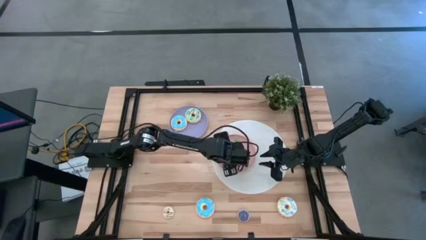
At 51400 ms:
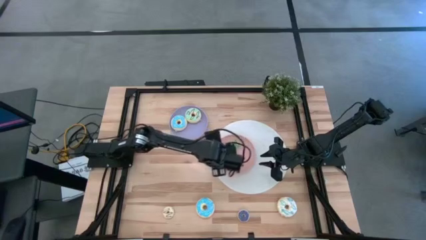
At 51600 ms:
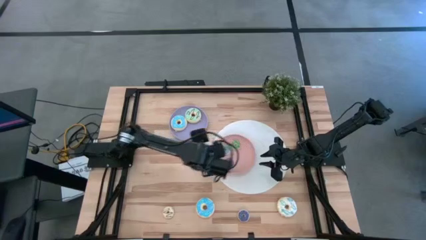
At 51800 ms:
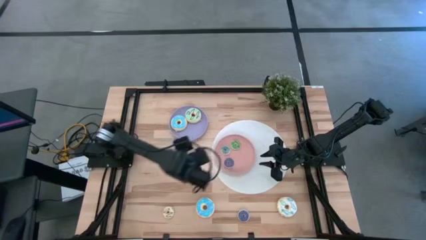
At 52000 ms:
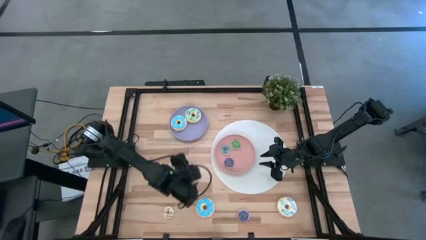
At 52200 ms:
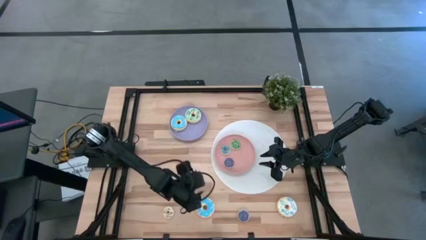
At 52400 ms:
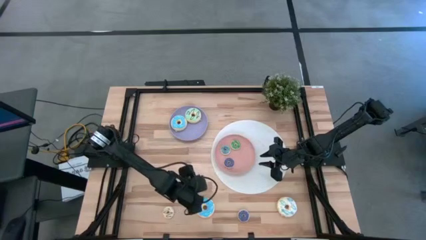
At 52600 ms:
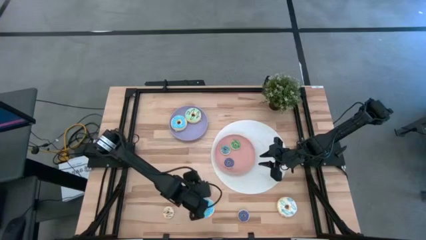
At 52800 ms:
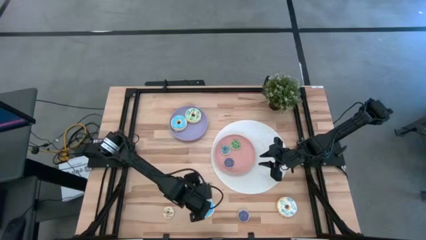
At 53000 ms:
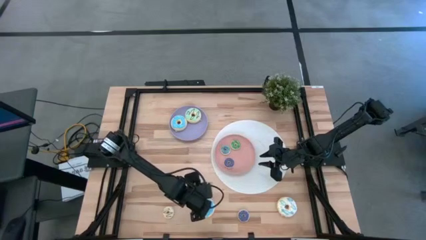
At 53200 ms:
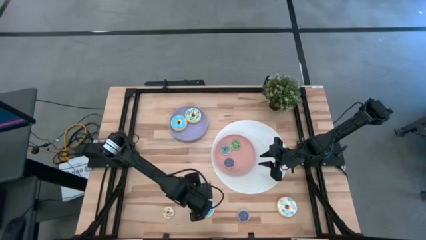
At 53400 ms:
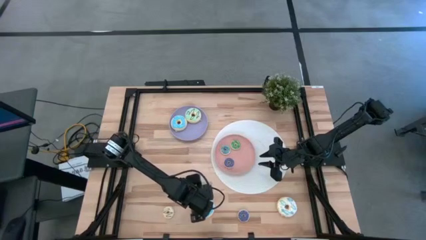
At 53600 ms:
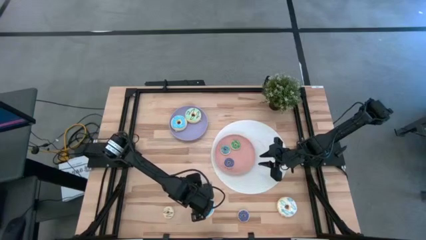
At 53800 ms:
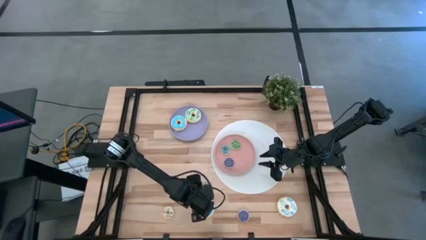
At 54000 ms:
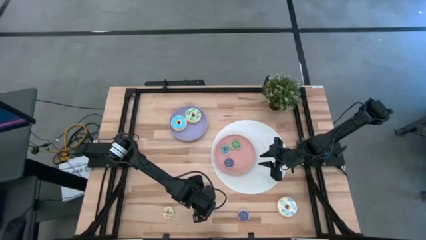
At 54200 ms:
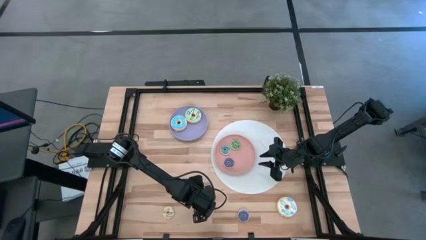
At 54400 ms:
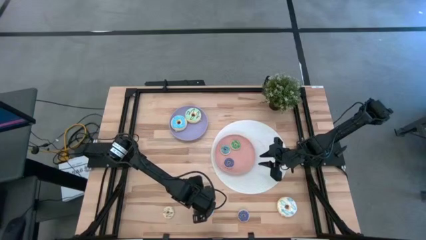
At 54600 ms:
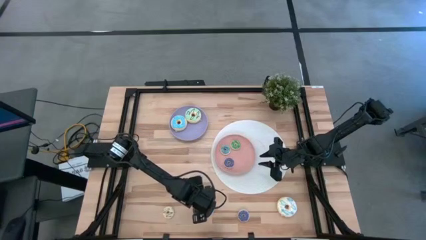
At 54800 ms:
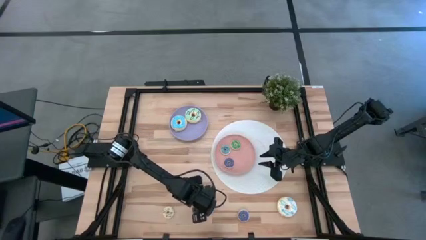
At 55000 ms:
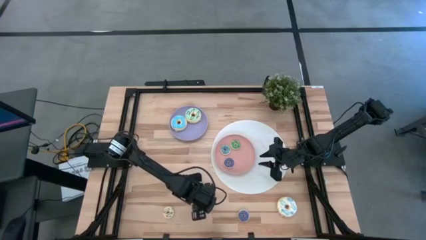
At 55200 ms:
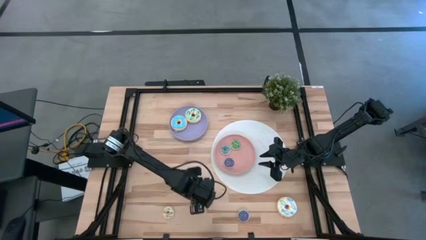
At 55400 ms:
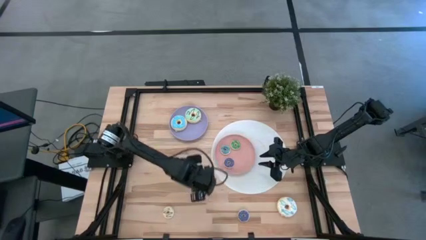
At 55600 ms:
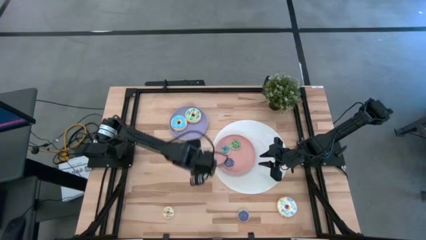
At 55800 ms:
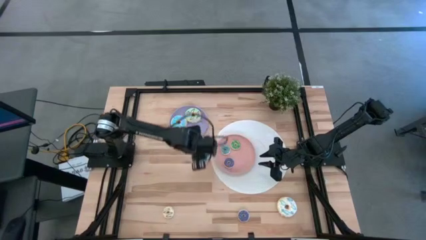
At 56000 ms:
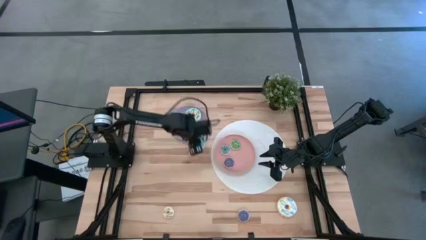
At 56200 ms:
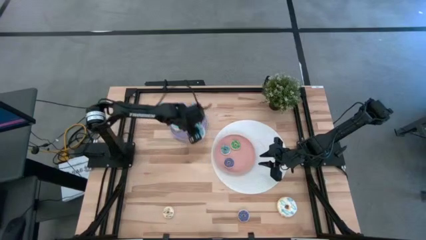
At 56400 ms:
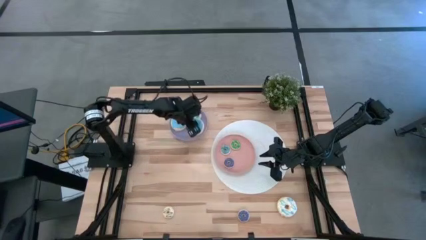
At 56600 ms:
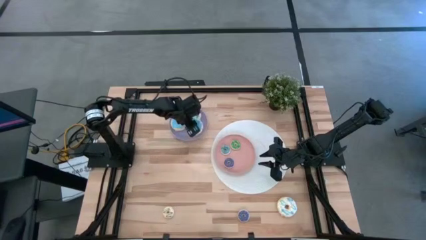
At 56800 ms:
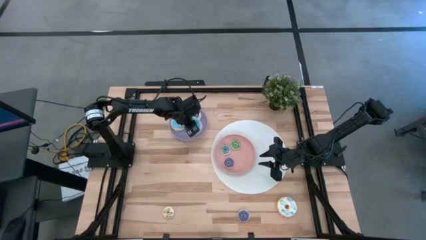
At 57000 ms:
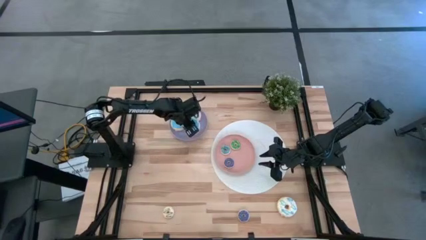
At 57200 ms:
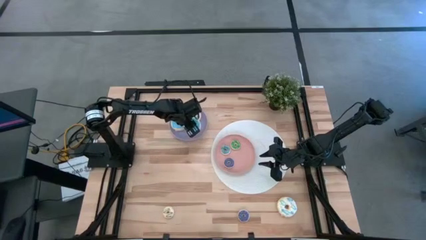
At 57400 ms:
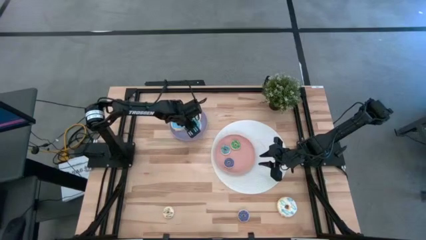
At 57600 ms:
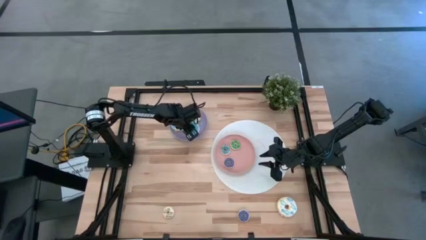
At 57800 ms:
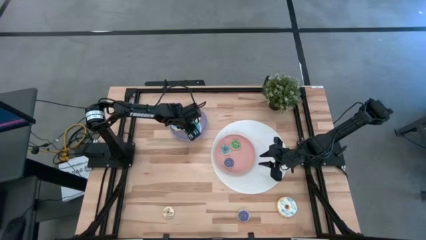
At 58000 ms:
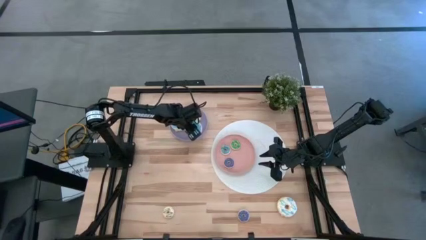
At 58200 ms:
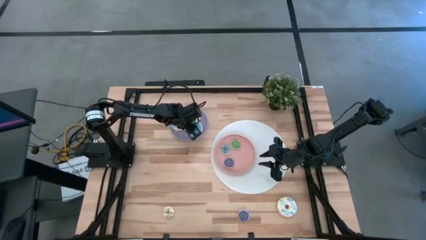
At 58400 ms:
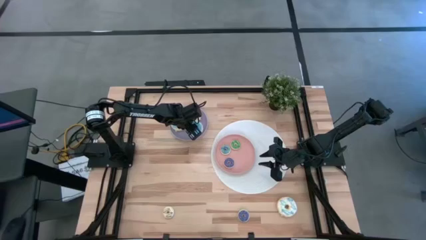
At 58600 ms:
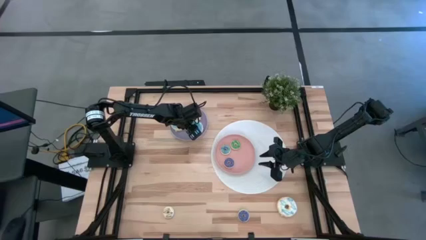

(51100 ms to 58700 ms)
Task: Pick & Place donuts
Put the big light blue donut on the violet plate

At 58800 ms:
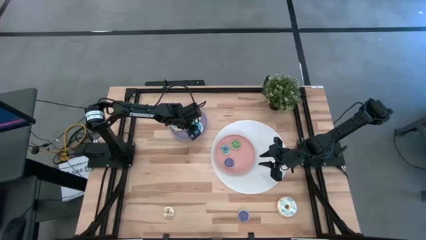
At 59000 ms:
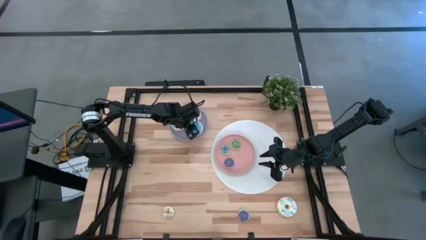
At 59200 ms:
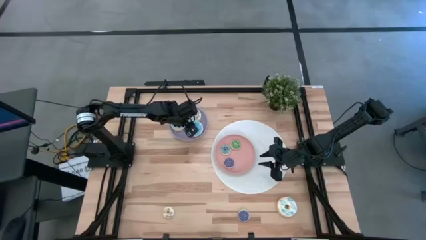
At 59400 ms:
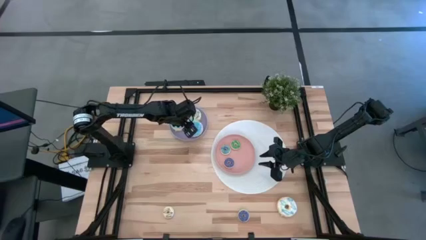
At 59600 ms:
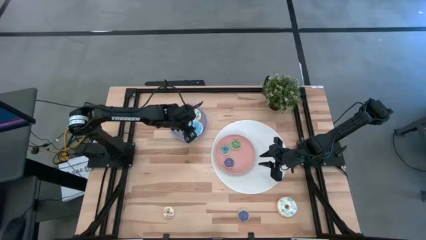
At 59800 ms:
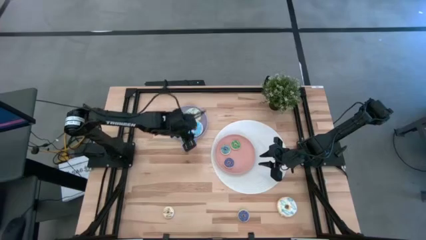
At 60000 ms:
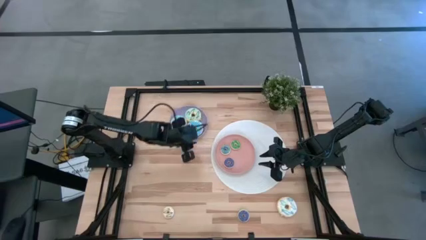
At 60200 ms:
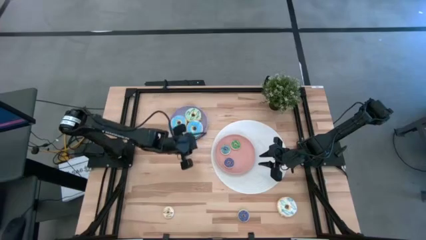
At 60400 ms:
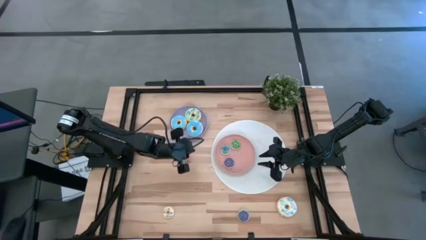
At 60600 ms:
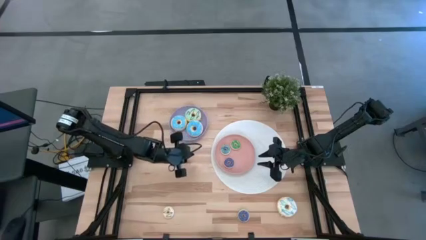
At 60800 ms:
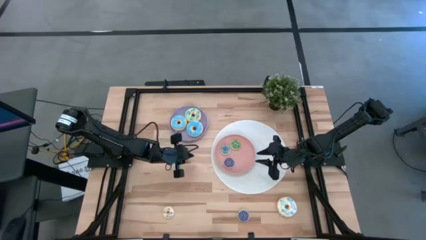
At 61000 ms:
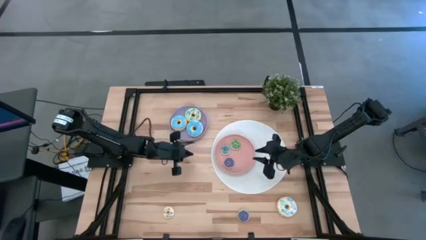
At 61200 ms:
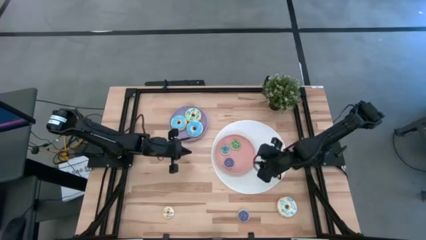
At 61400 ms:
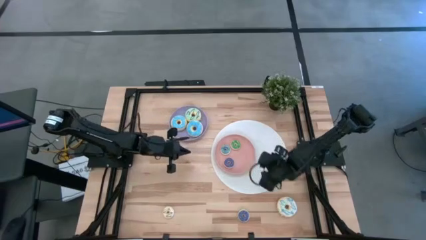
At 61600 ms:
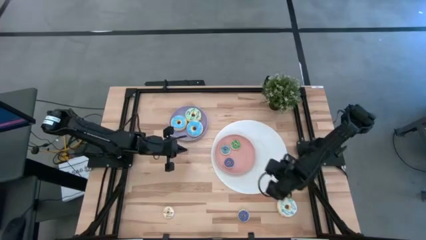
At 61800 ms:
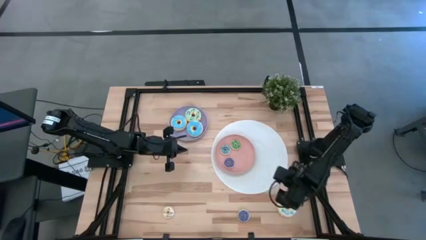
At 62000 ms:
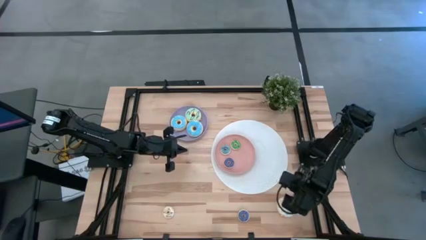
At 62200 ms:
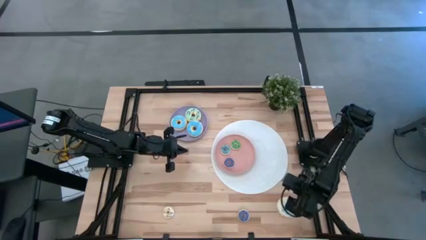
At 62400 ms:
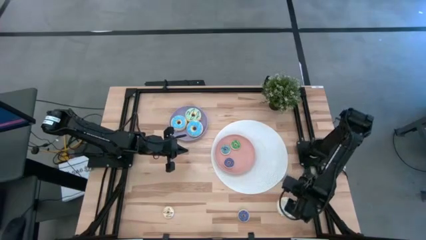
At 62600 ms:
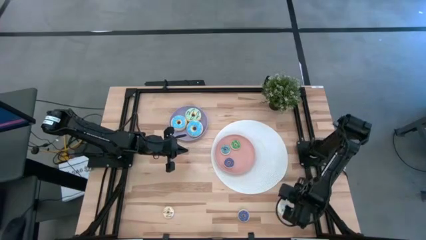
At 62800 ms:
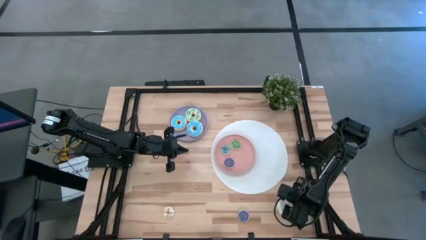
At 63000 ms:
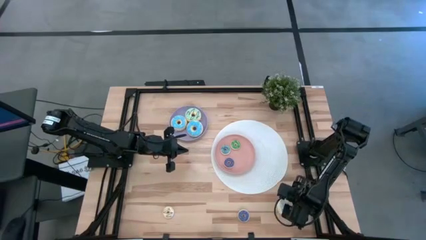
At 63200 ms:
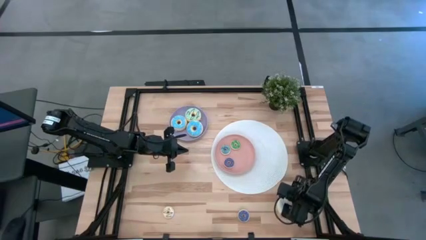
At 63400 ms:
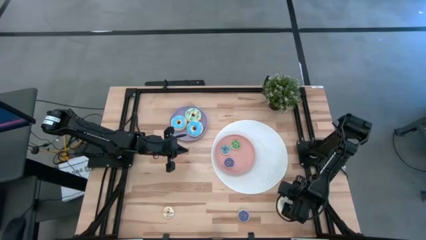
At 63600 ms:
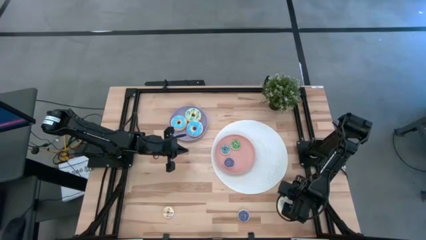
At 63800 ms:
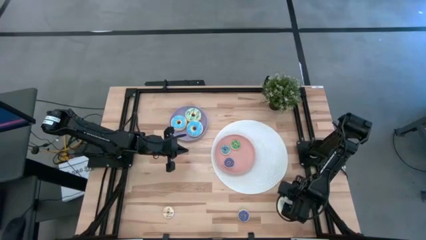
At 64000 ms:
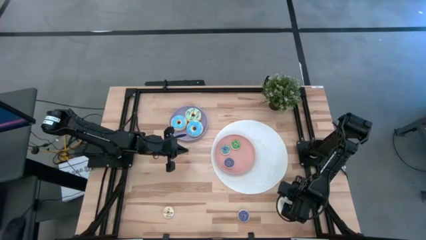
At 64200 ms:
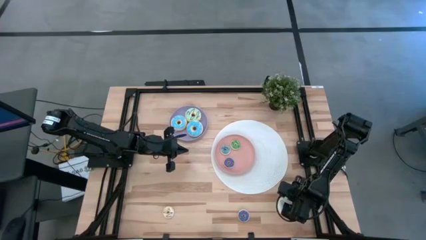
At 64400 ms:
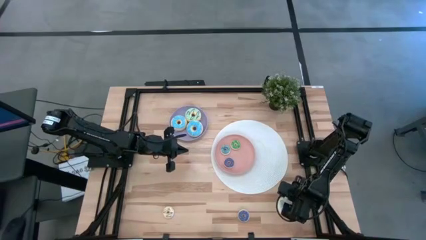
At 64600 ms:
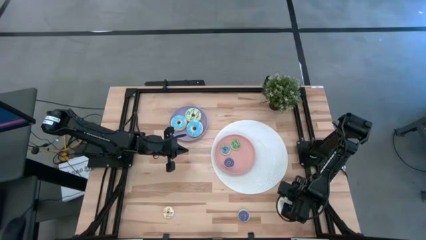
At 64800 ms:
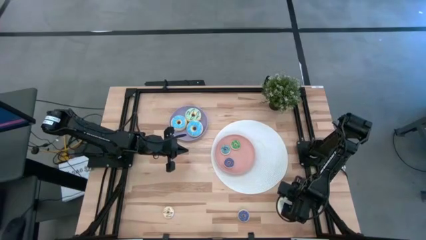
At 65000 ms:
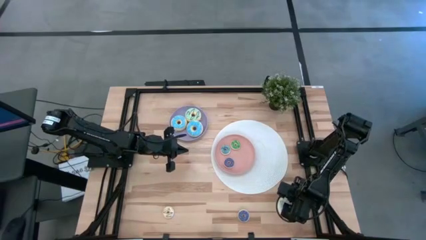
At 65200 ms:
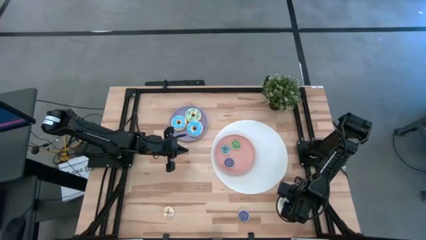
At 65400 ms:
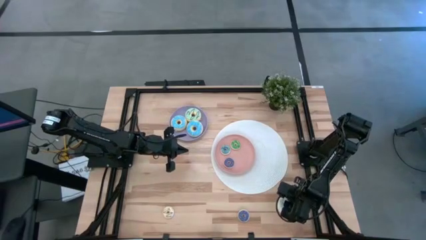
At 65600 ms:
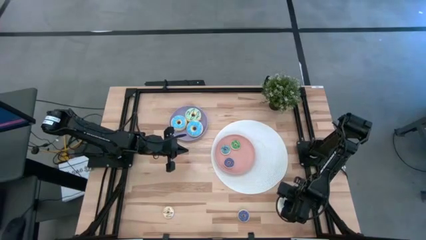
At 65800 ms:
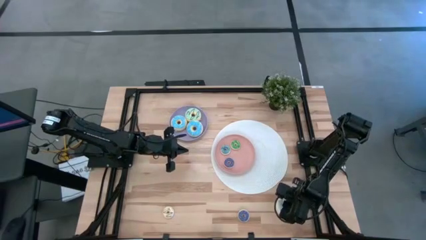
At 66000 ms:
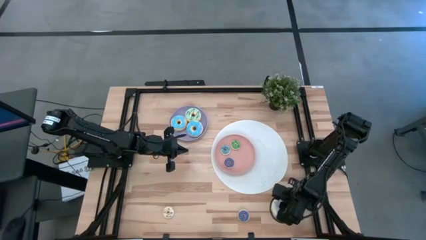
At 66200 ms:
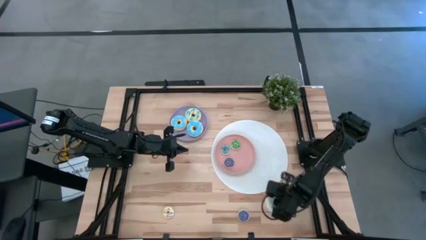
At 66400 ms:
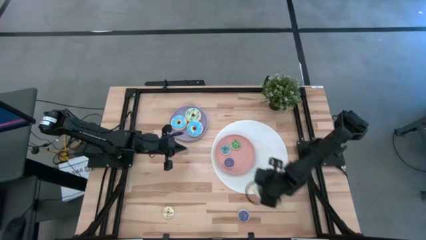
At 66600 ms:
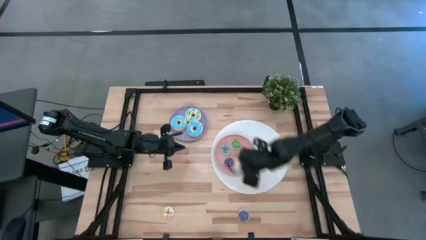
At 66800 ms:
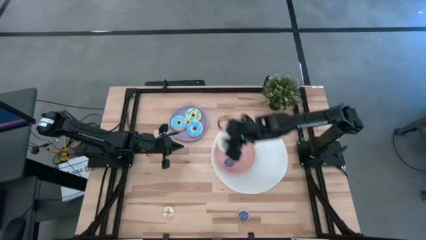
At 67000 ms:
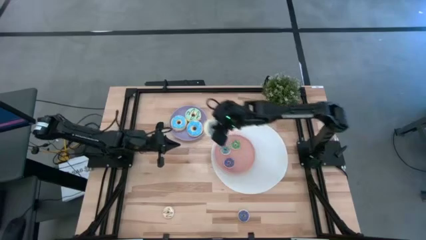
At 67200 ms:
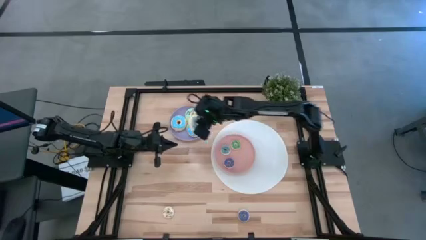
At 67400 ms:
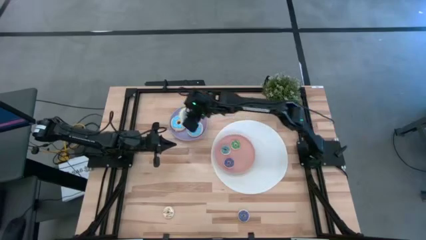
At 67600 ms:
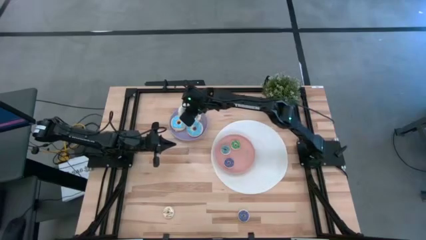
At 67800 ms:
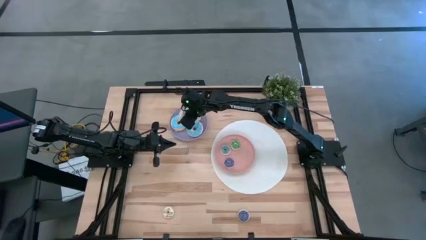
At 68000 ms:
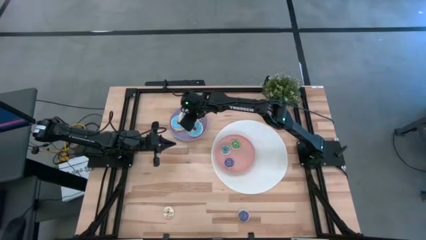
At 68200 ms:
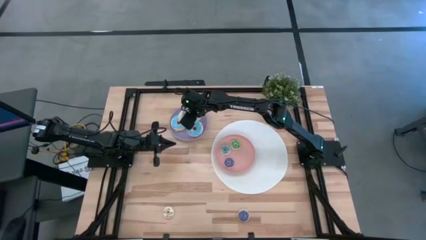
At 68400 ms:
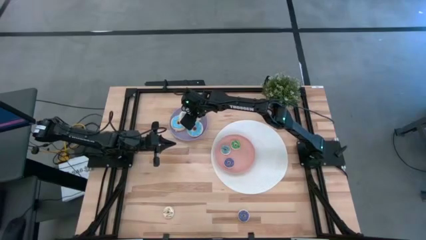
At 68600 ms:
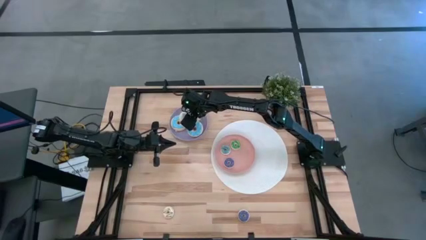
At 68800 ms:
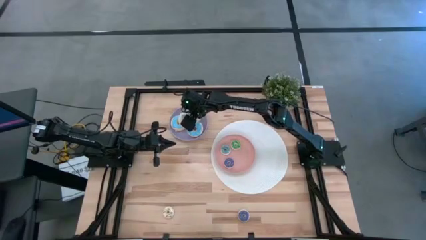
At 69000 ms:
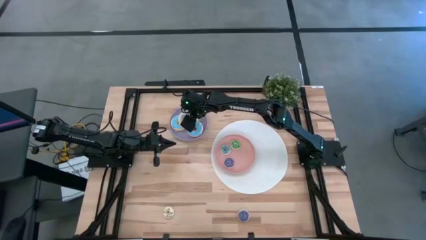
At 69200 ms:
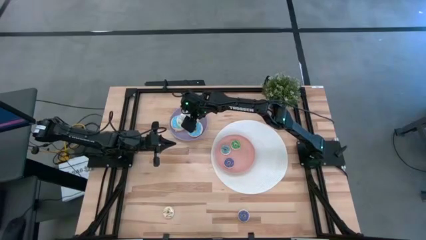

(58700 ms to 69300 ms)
Put the large white donut on the violet plate
